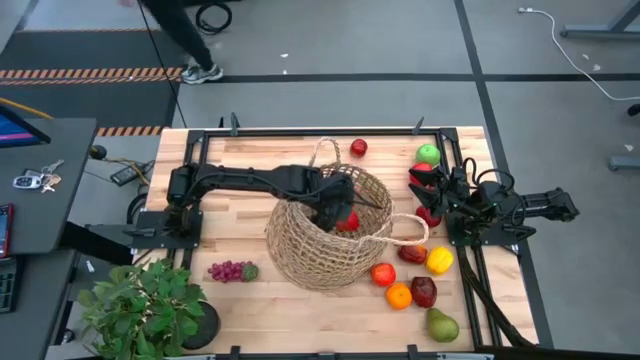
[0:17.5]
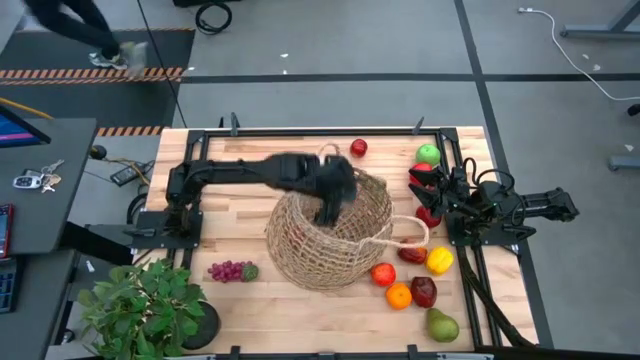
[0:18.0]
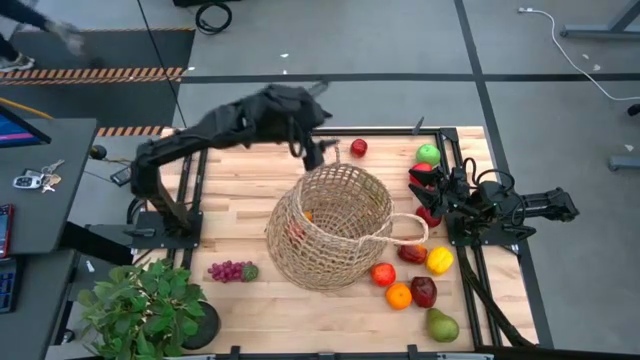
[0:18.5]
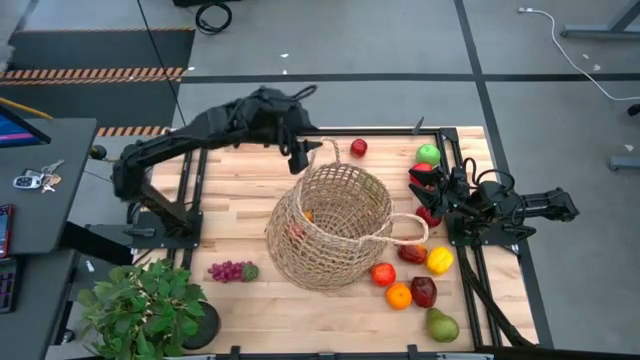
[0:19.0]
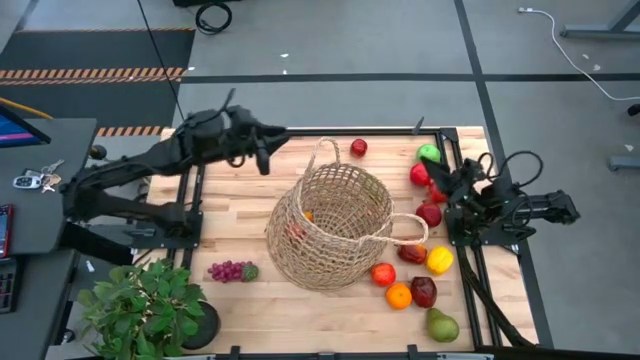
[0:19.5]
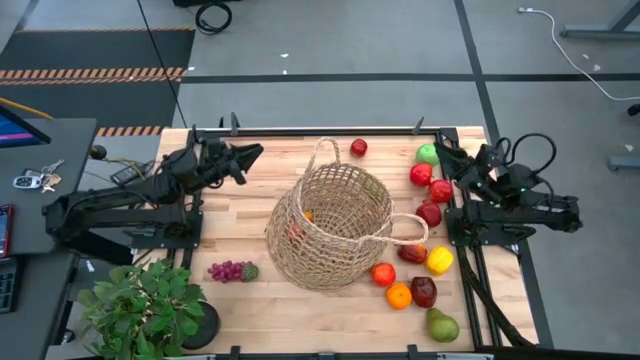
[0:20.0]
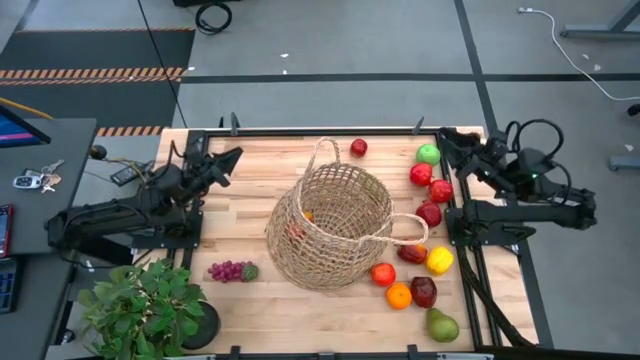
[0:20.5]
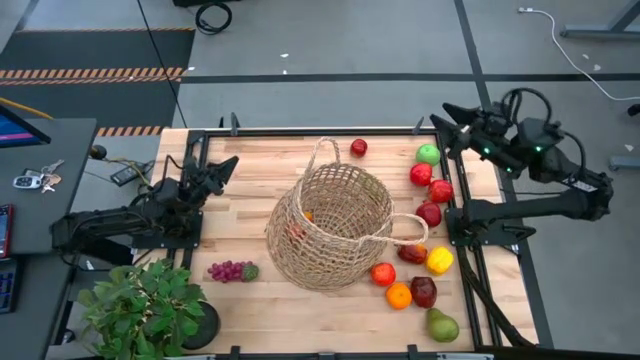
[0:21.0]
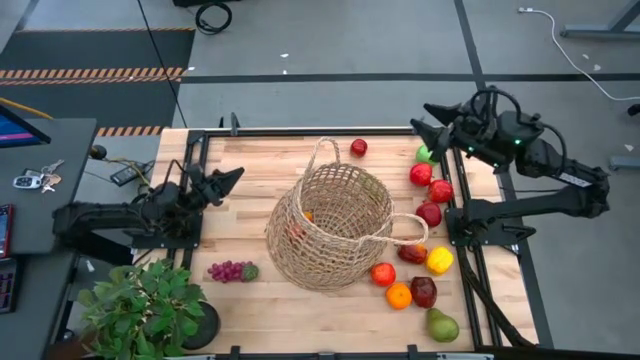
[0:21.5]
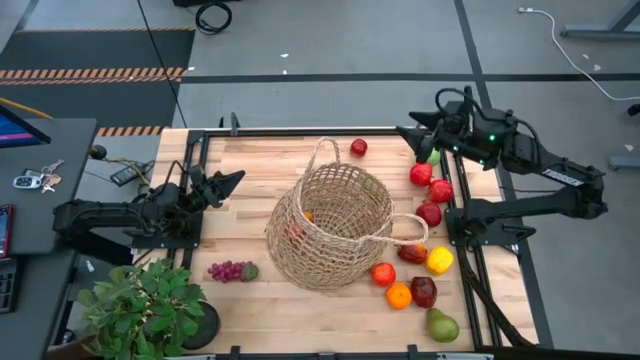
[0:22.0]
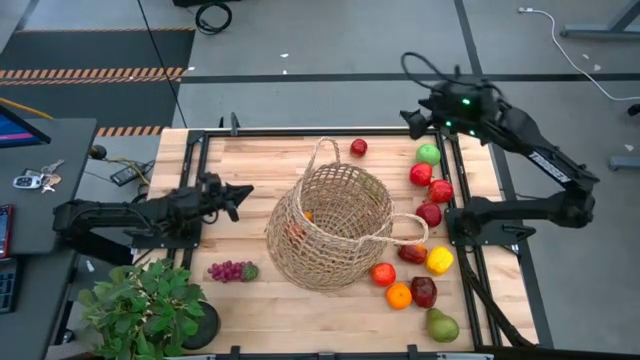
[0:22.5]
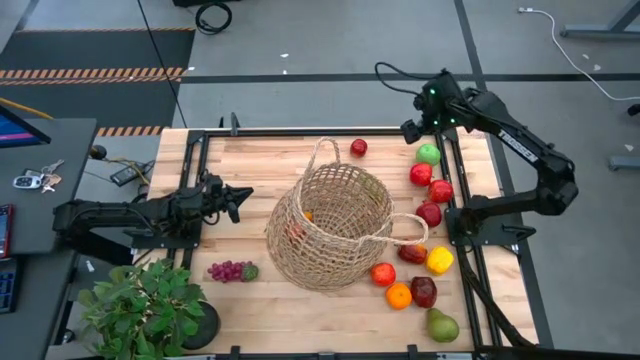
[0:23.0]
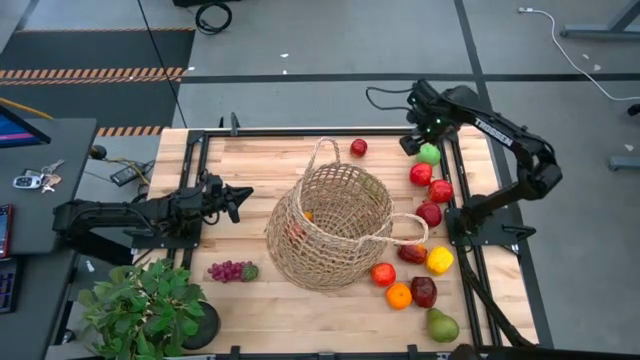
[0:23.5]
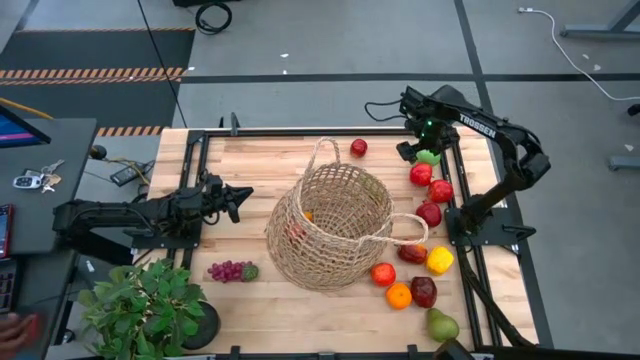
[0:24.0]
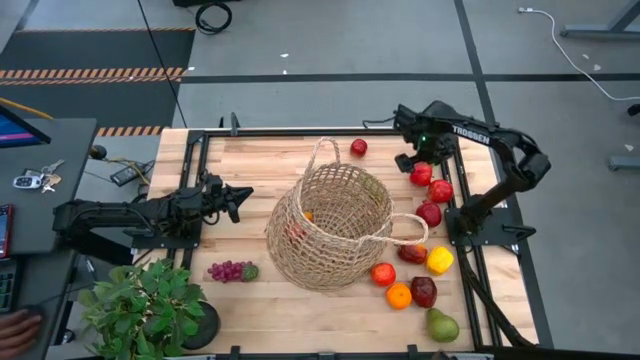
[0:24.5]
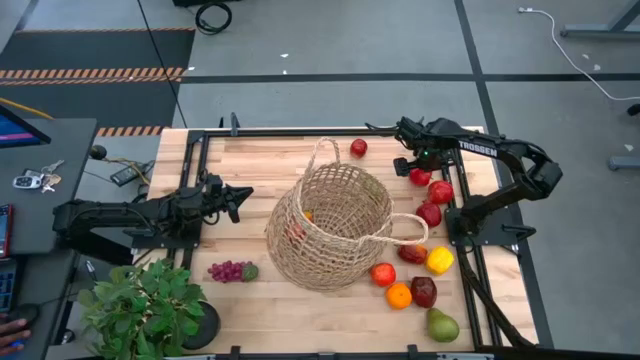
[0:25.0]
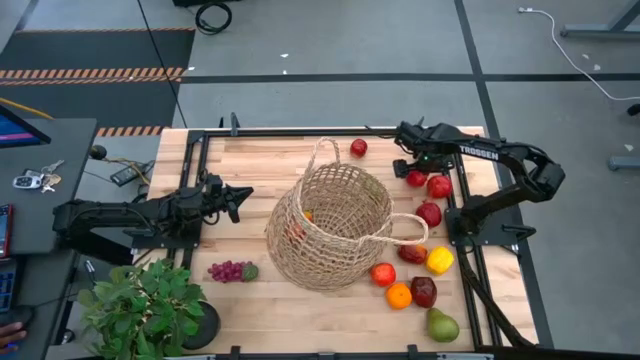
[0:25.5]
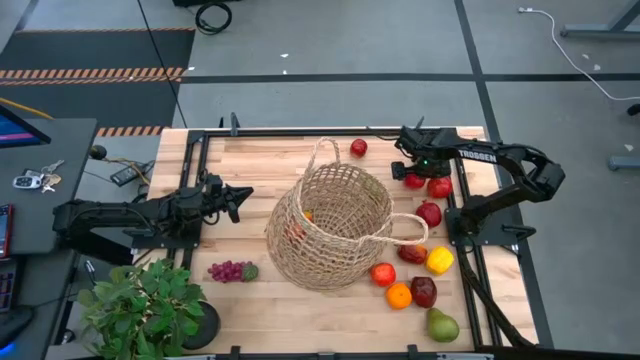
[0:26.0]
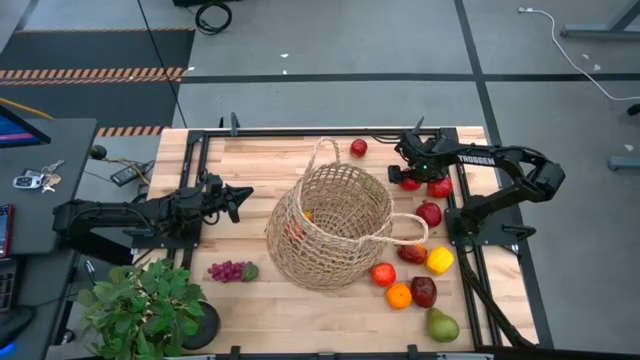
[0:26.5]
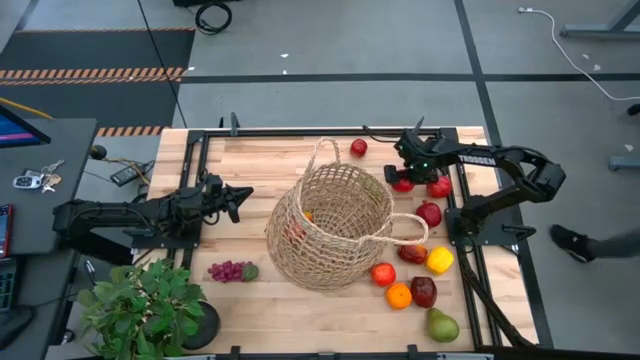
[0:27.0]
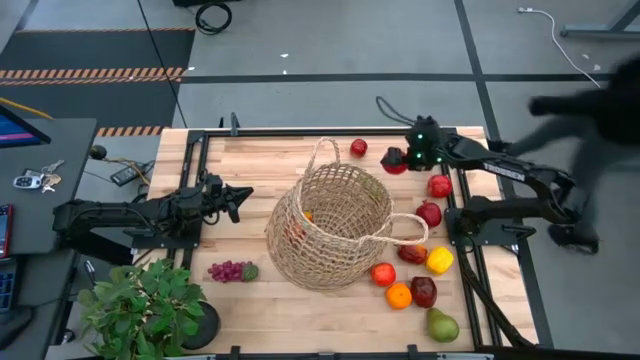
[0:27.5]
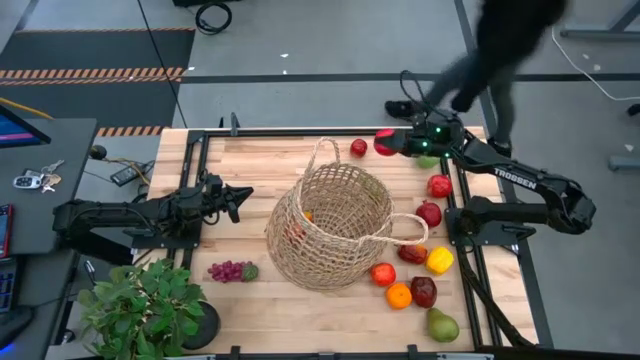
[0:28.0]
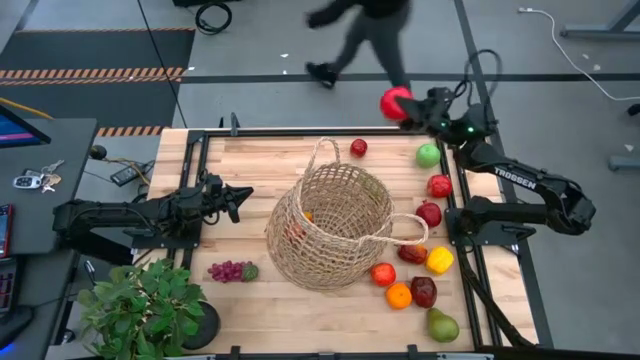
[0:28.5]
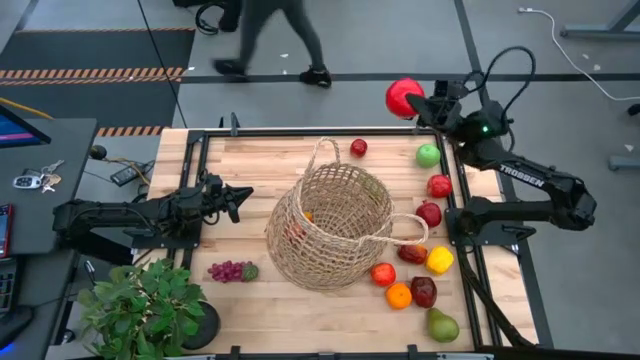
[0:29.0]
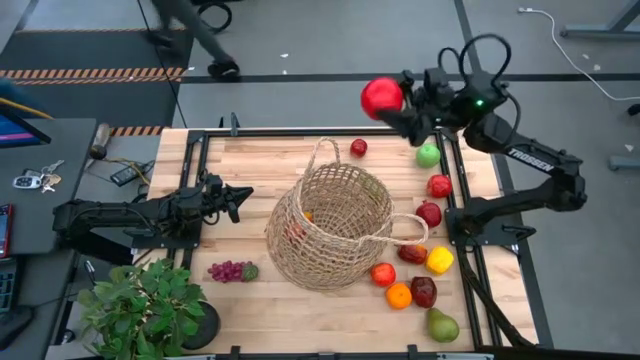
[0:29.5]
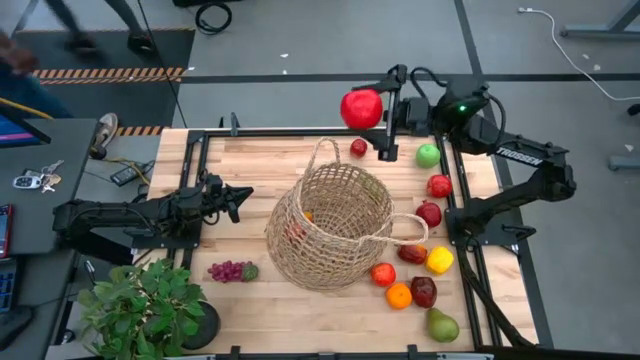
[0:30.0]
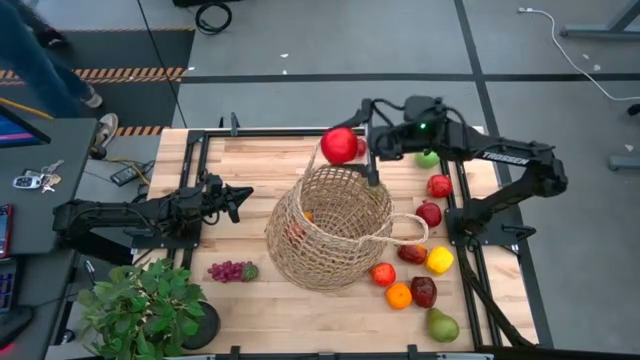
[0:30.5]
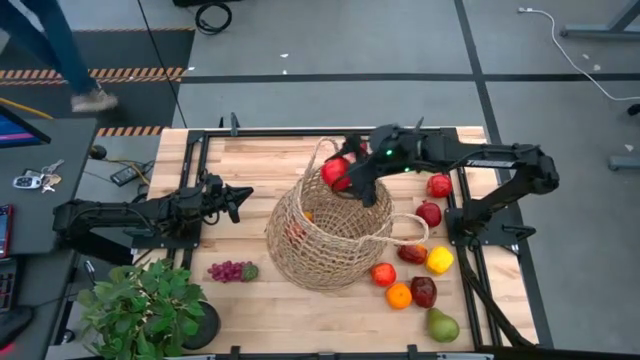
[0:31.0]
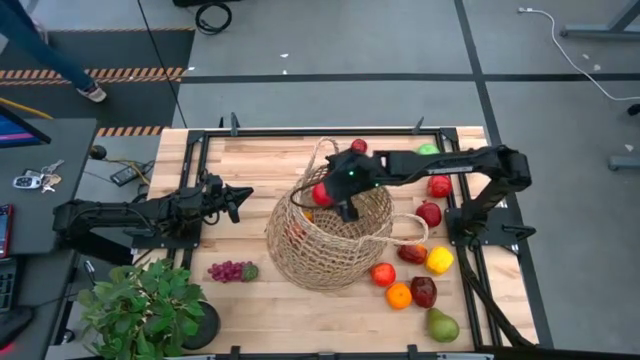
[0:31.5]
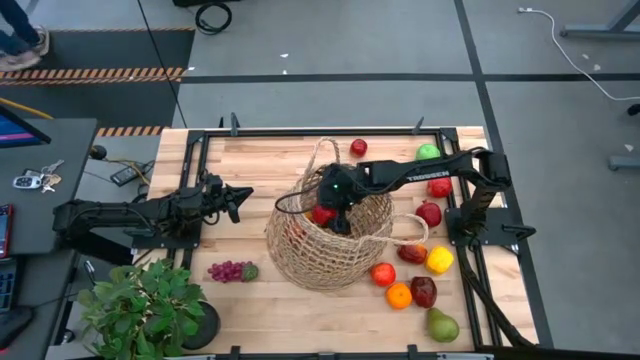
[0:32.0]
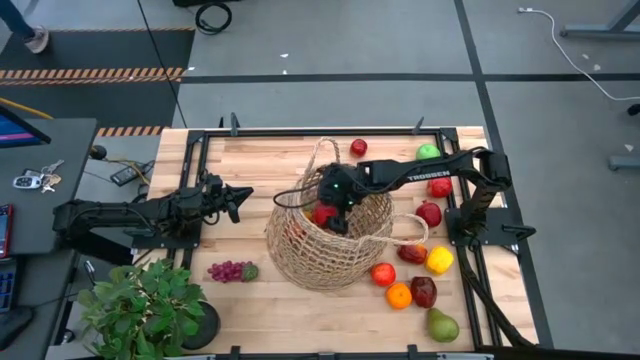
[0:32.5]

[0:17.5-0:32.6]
Task: Build produce basket
Put the red apple into the brown basket

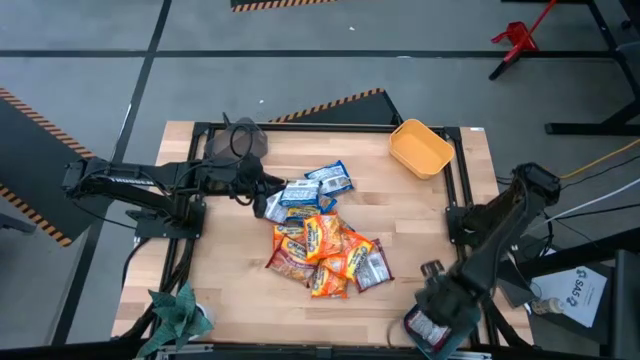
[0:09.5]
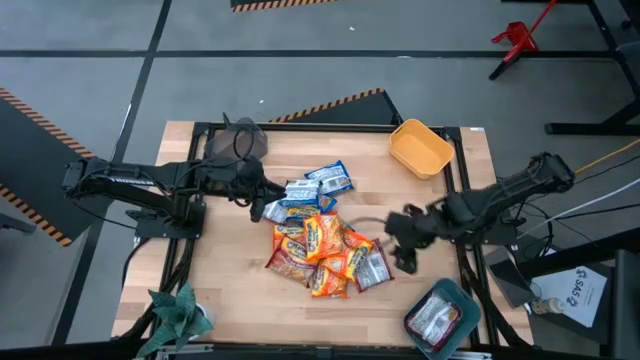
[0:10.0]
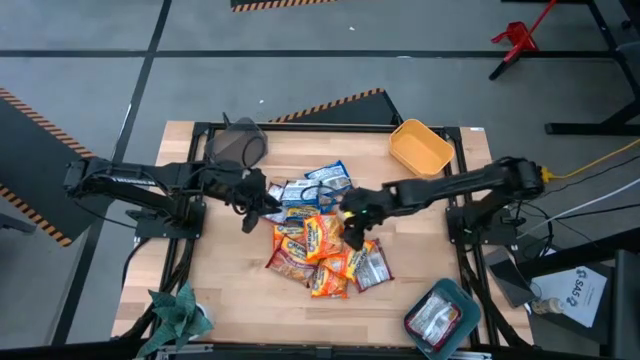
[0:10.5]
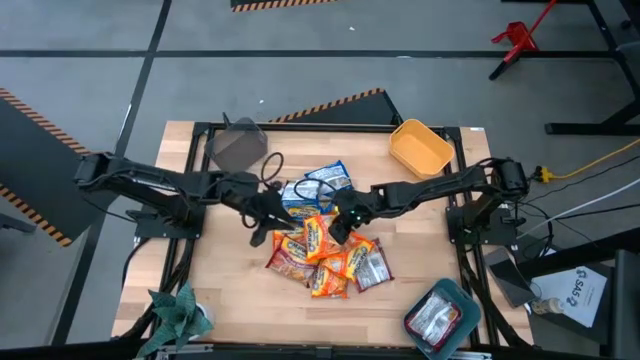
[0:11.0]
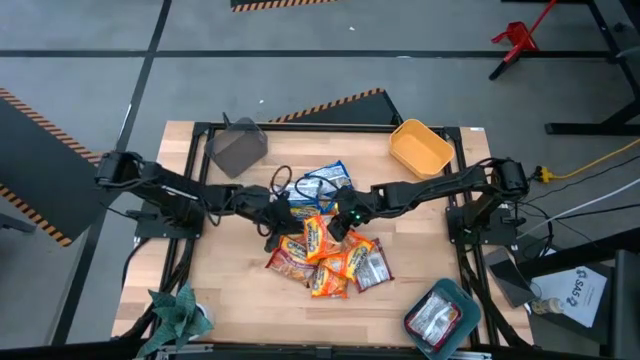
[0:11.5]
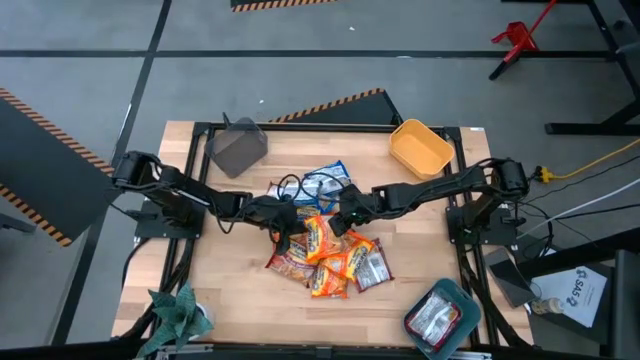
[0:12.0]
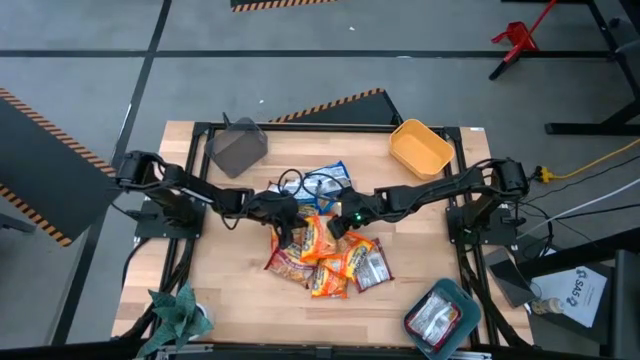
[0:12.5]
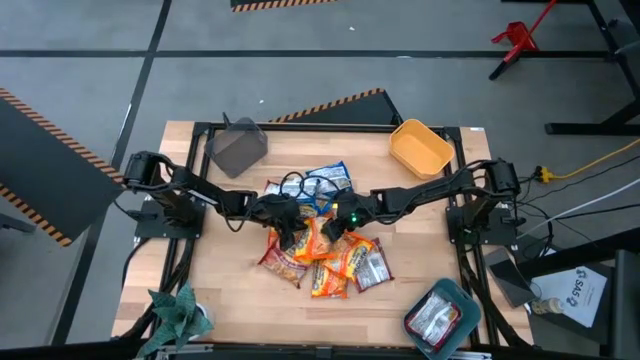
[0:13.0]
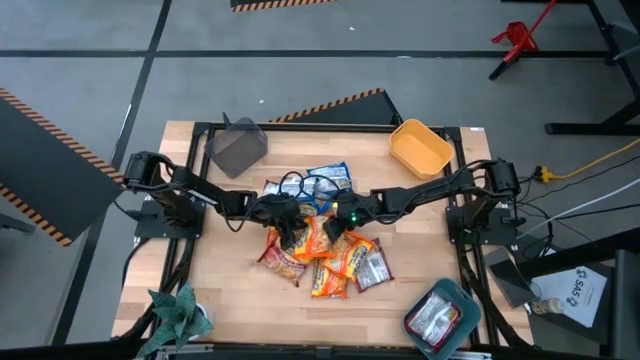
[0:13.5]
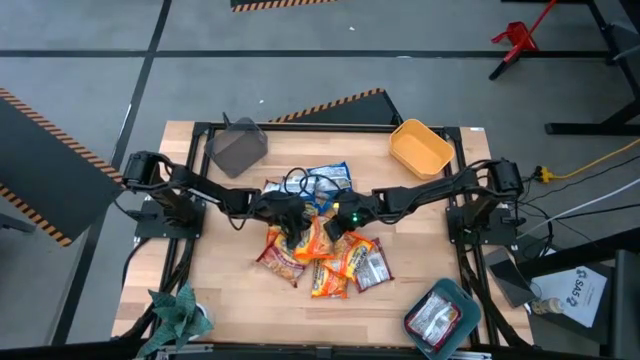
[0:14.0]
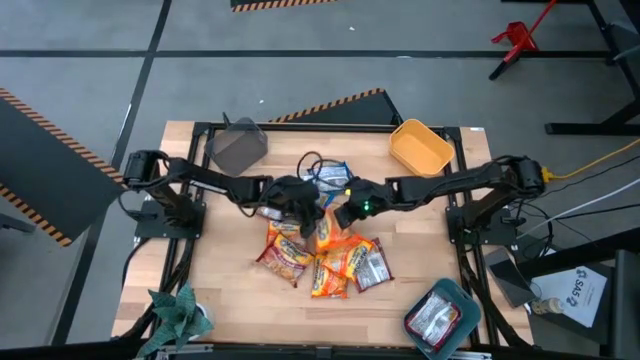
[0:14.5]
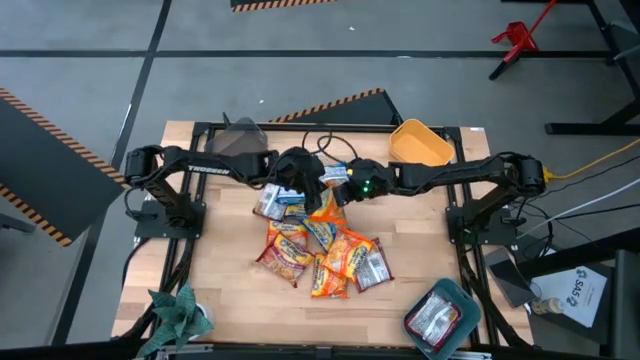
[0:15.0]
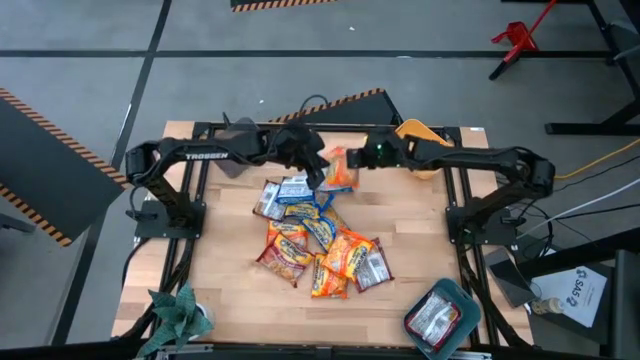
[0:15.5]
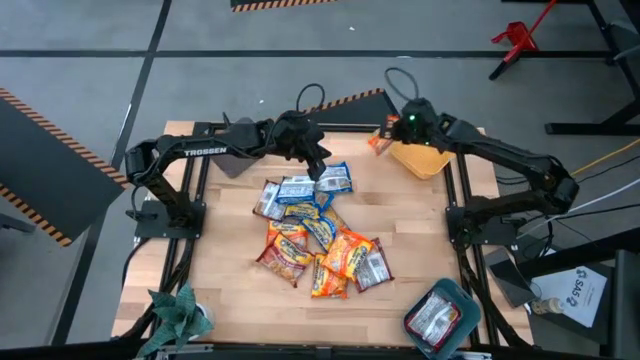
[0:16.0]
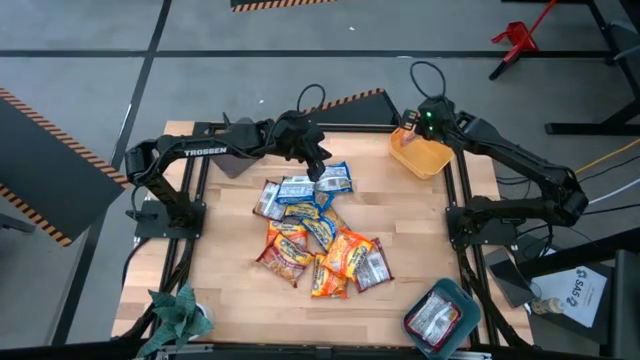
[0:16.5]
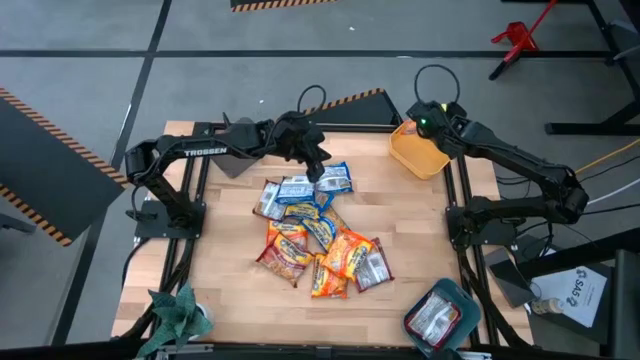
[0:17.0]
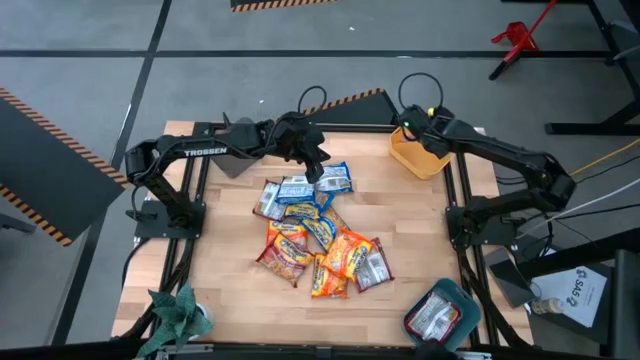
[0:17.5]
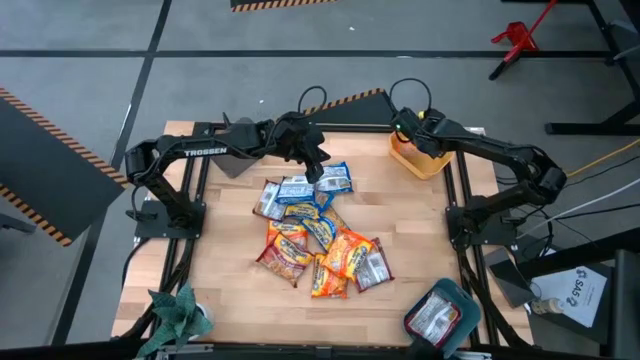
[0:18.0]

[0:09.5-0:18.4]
Task: Sort Maruchan noodles
Put the orange noodle pack into the yellow bin
